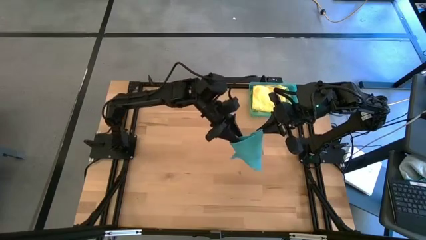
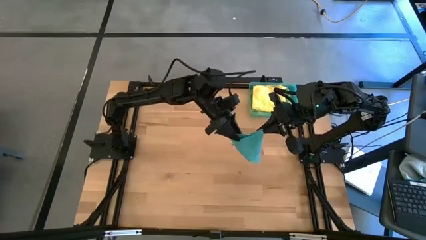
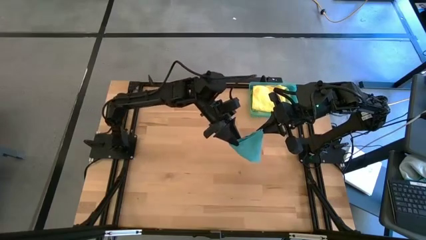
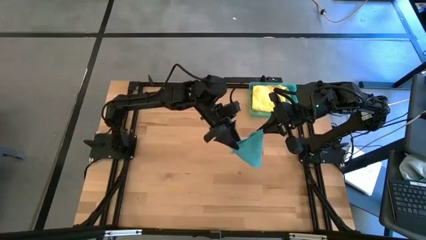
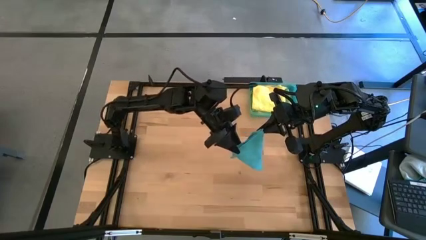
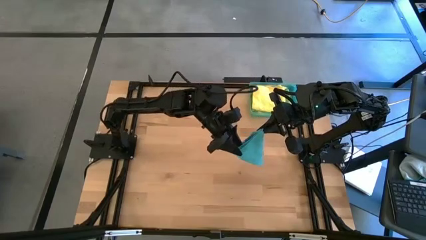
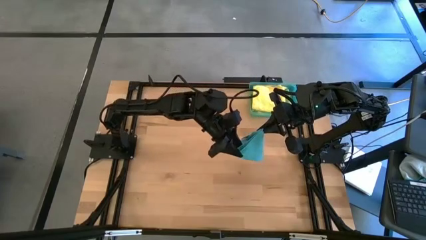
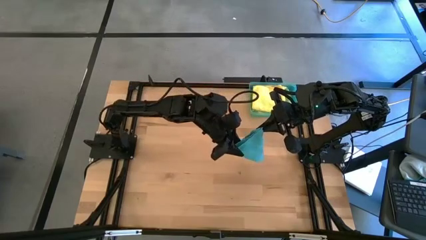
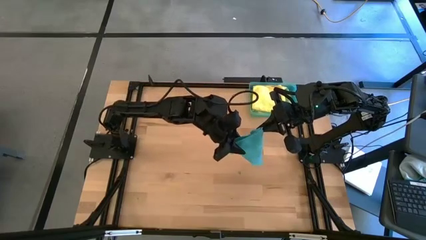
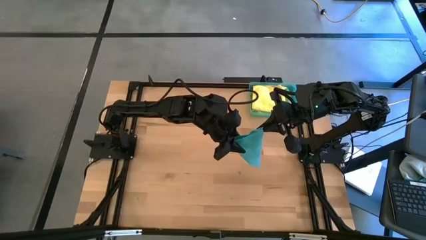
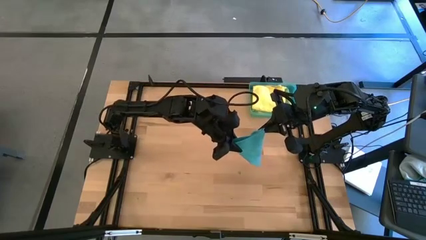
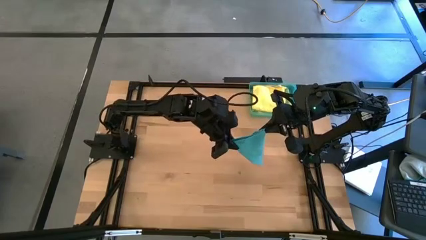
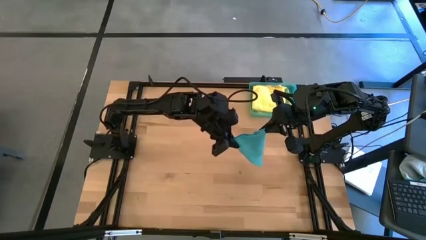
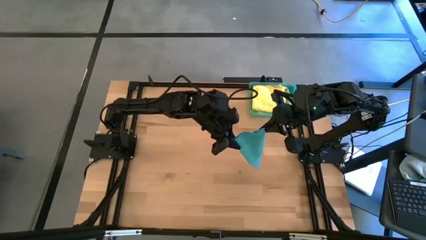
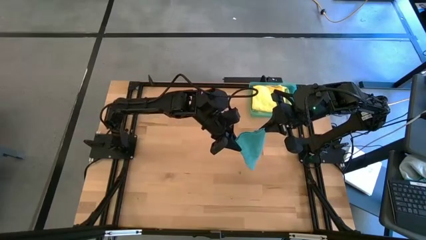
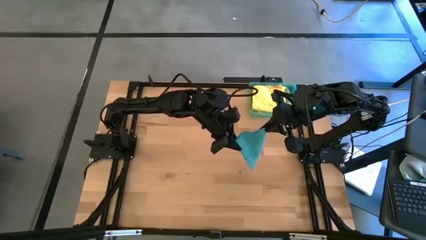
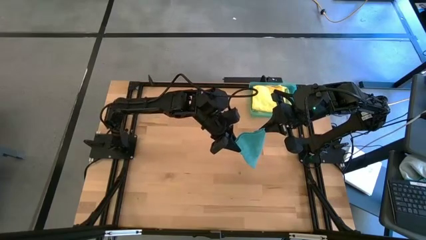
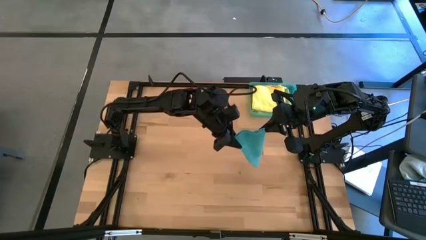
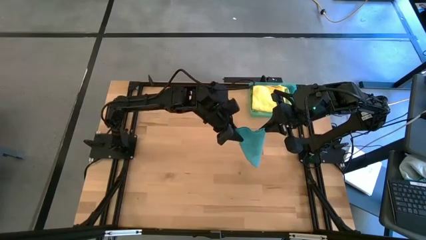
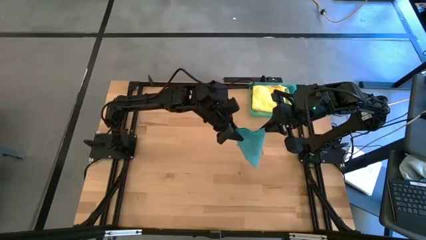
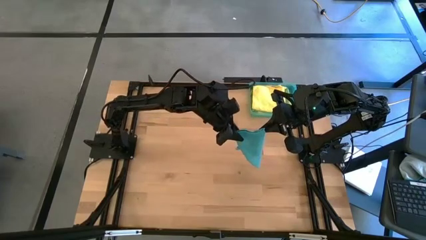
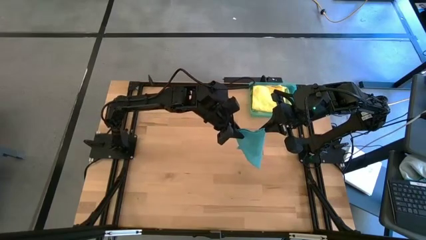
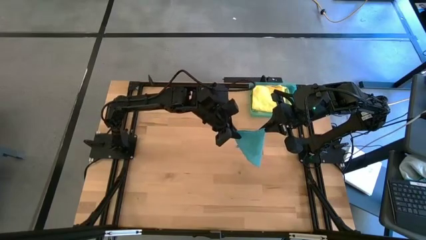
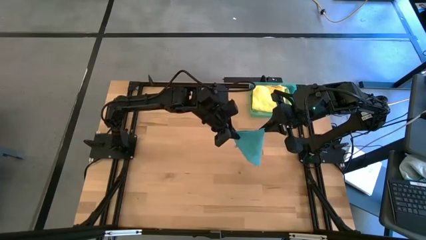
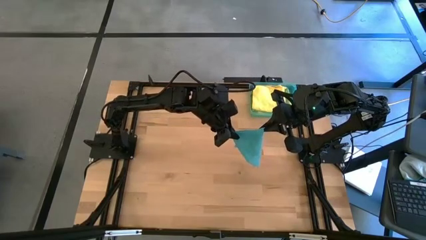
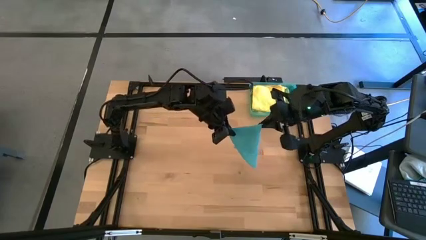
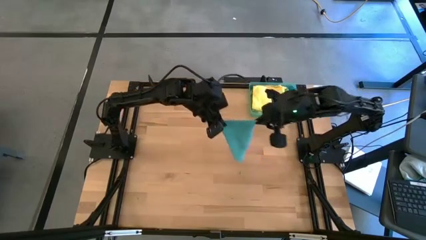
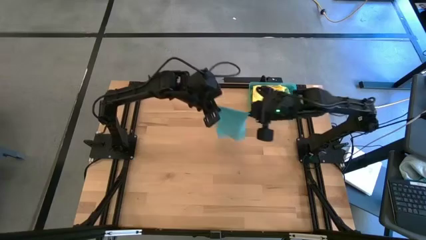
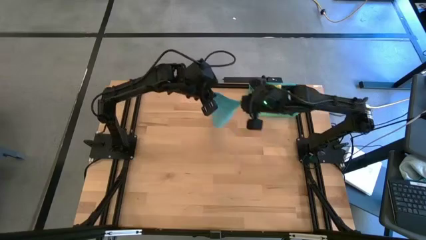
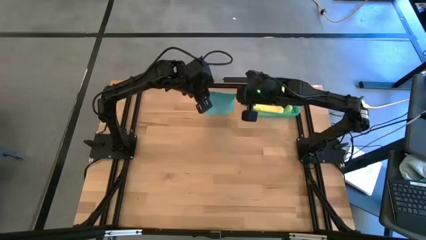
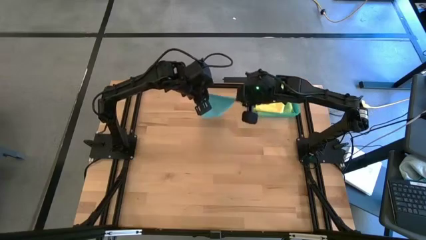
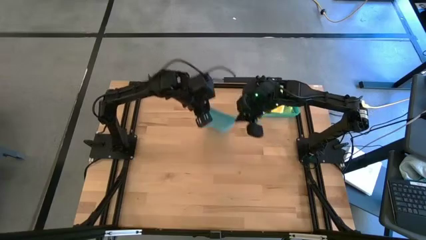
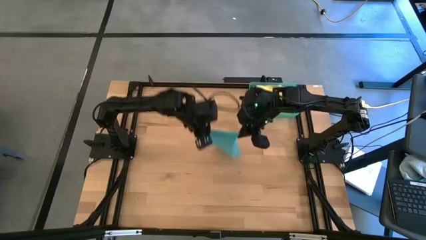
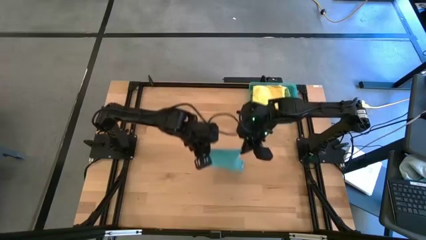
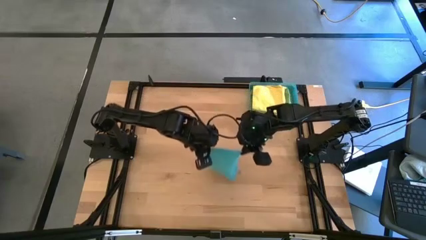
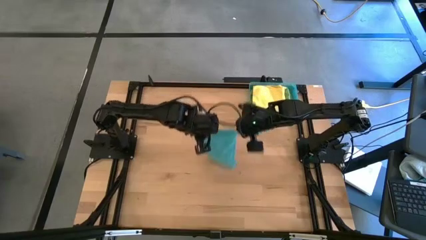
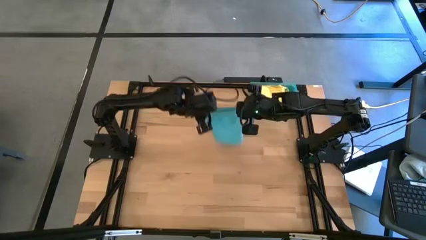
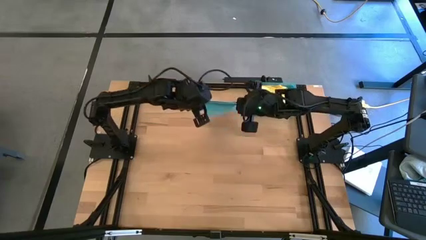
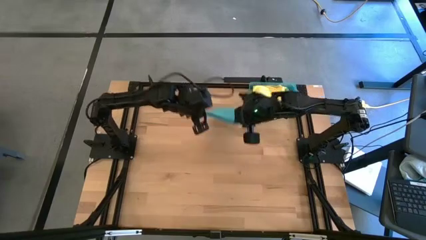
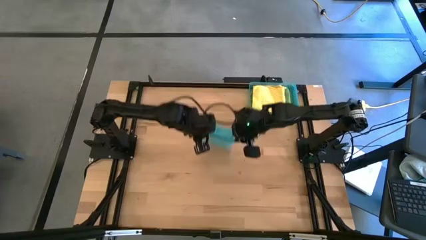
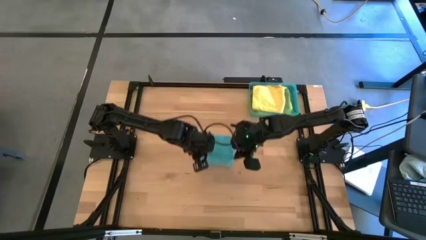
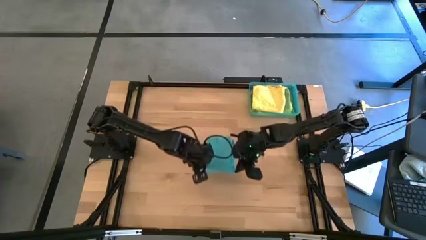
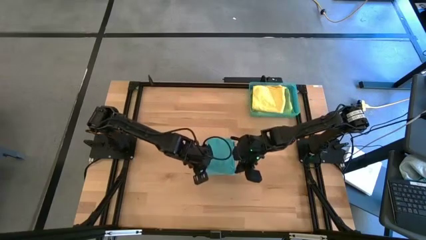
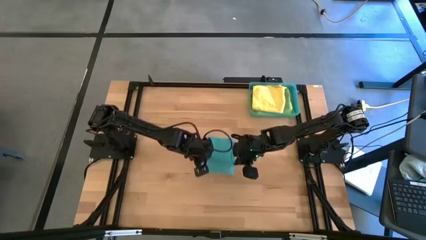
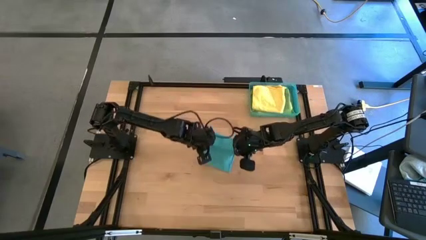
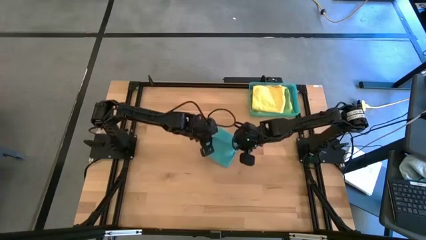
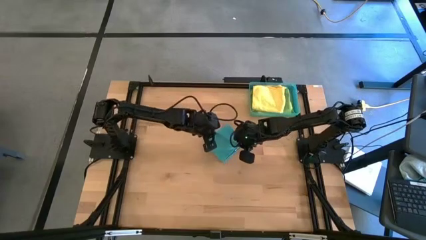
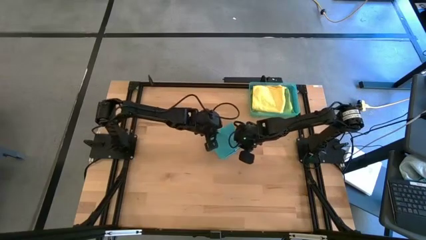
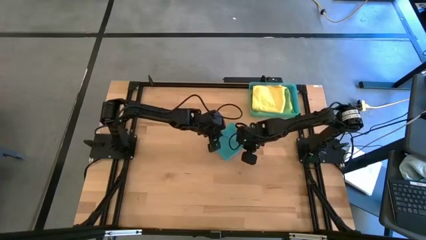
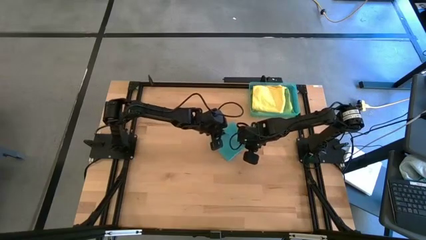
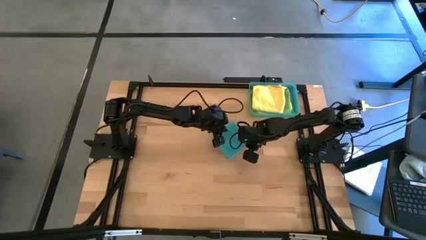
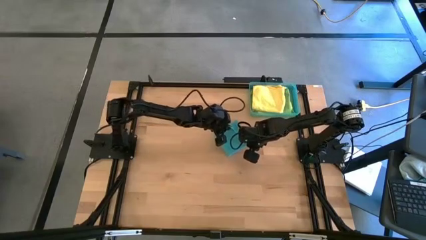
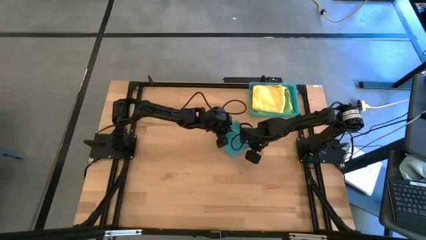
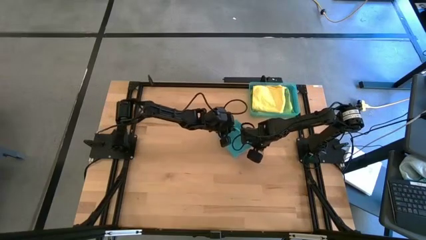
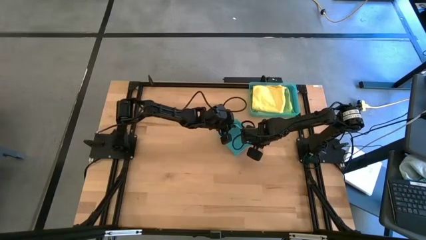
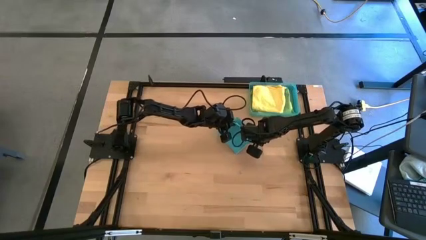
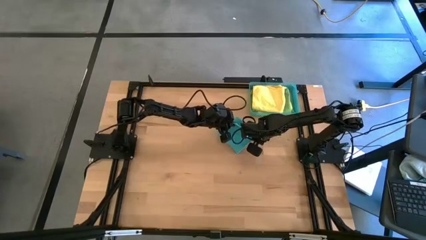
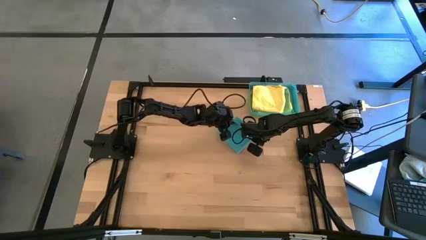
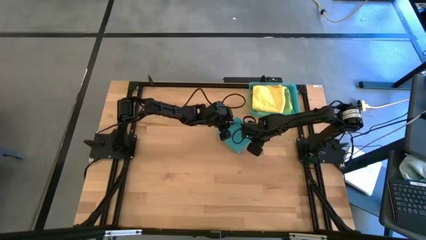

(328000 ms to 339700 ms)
Task: Fold microfiber towels
Fold the blue microfiber cloth
